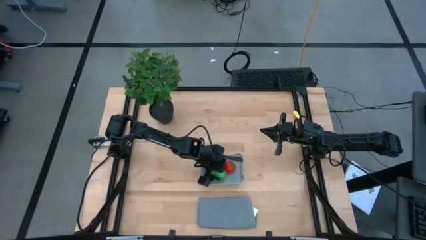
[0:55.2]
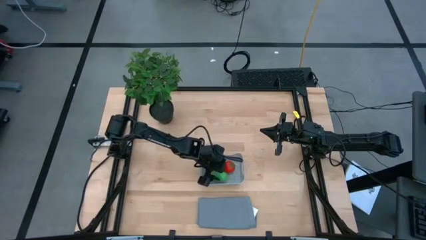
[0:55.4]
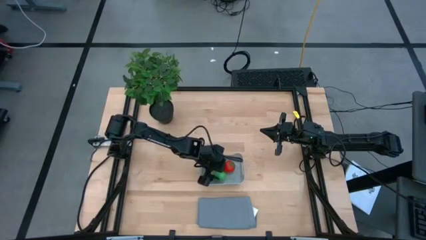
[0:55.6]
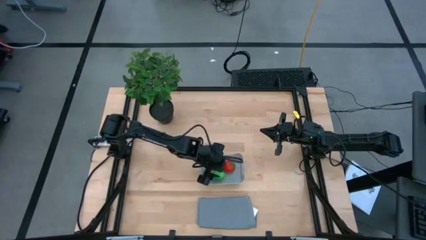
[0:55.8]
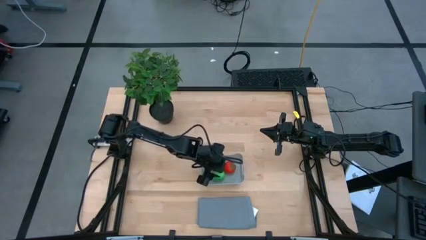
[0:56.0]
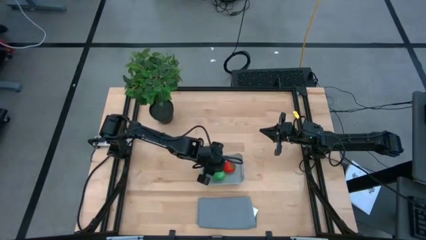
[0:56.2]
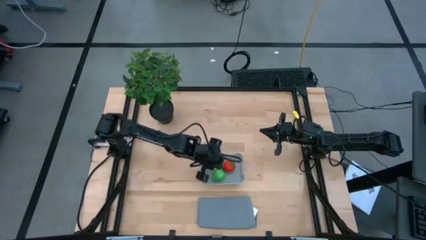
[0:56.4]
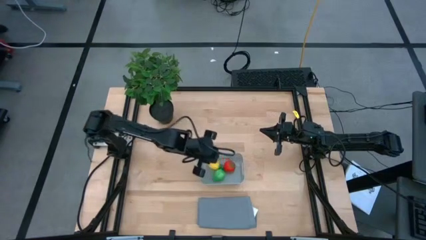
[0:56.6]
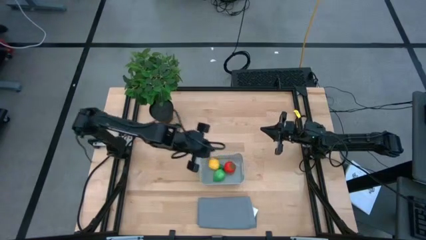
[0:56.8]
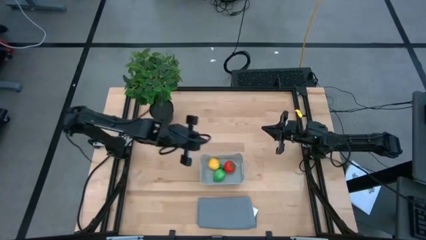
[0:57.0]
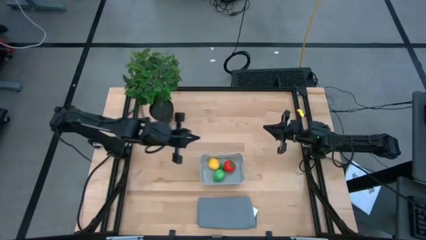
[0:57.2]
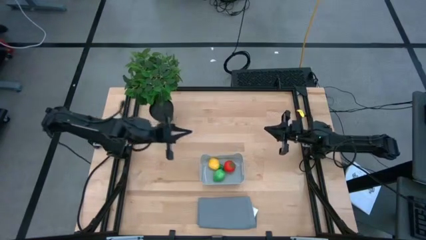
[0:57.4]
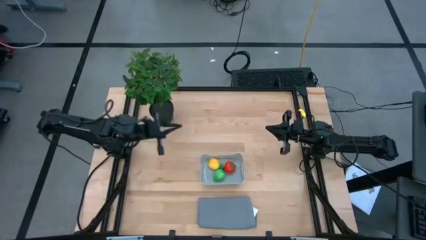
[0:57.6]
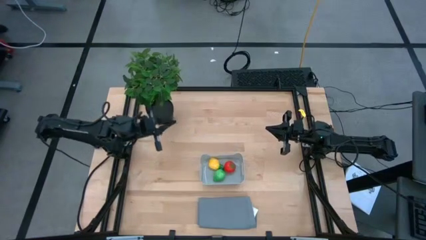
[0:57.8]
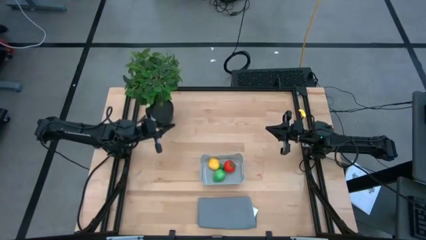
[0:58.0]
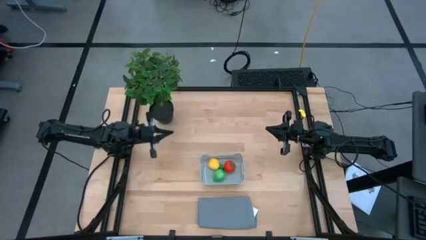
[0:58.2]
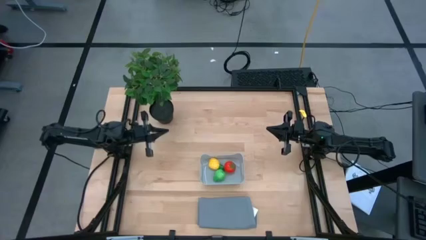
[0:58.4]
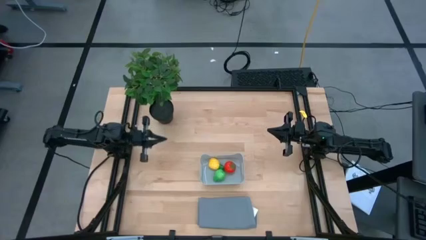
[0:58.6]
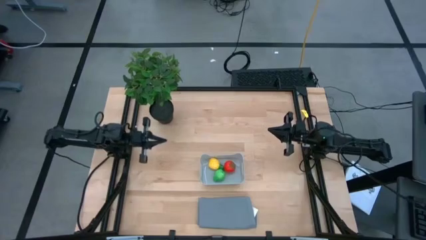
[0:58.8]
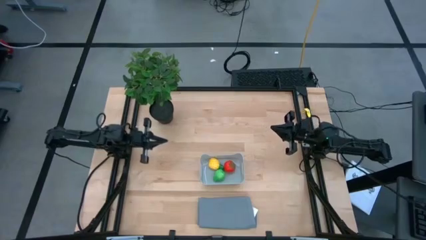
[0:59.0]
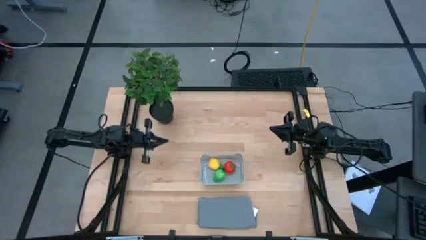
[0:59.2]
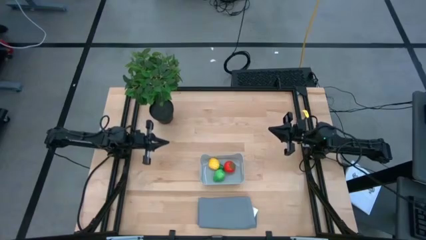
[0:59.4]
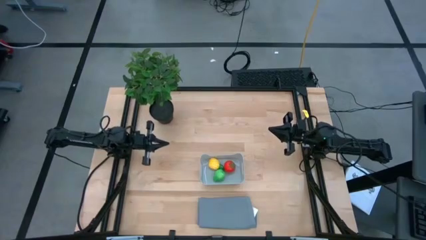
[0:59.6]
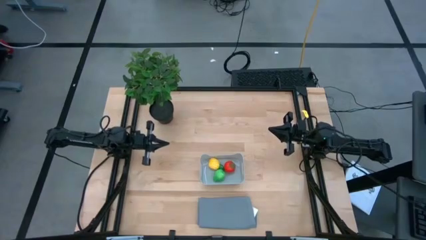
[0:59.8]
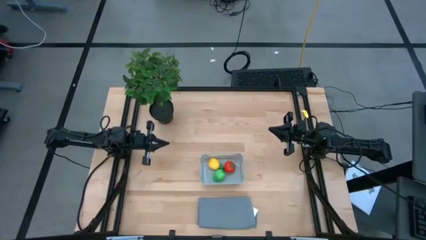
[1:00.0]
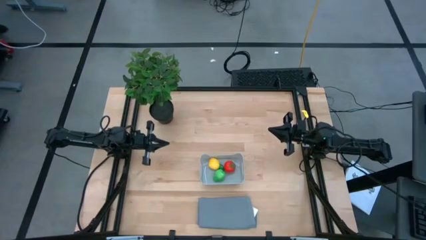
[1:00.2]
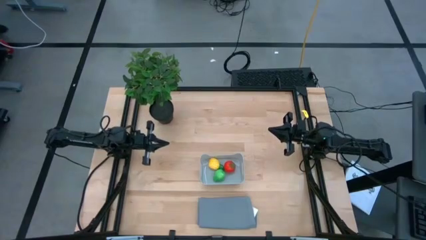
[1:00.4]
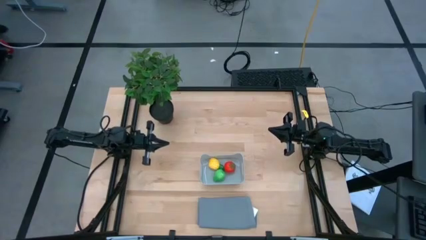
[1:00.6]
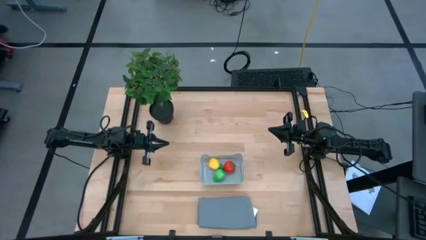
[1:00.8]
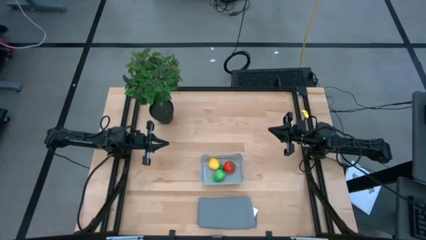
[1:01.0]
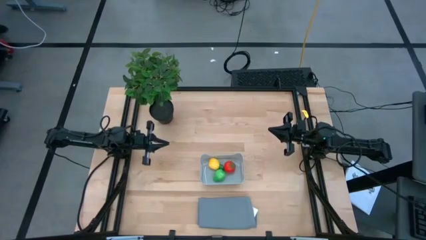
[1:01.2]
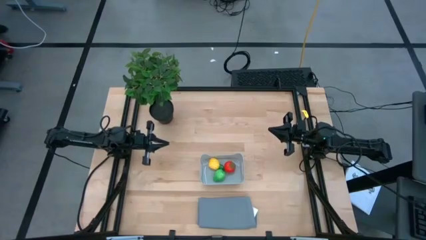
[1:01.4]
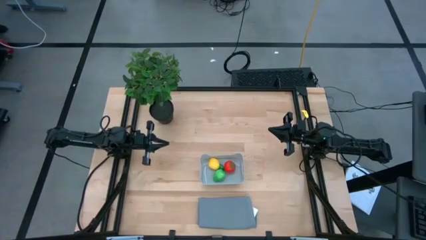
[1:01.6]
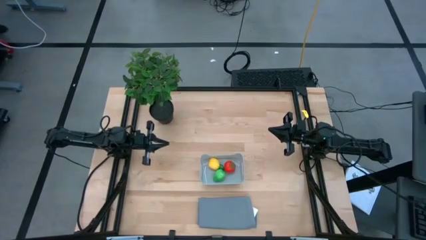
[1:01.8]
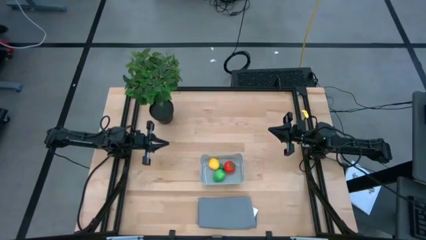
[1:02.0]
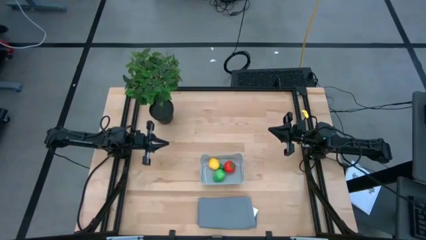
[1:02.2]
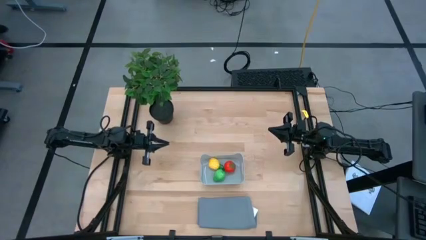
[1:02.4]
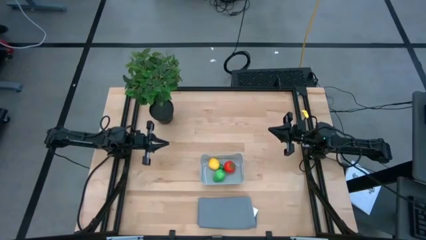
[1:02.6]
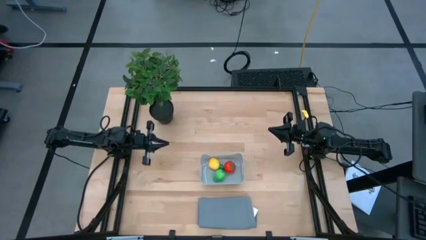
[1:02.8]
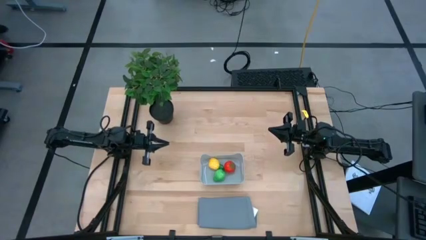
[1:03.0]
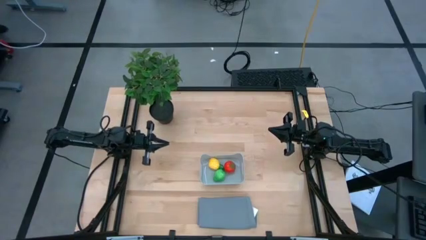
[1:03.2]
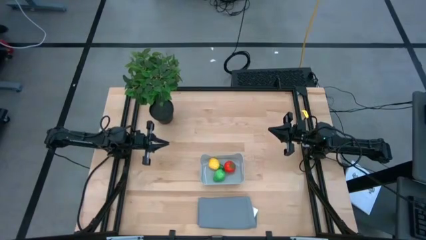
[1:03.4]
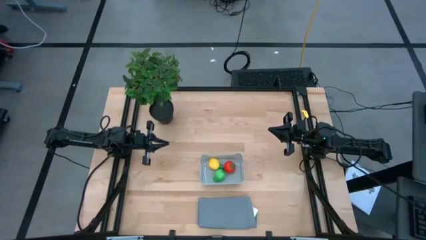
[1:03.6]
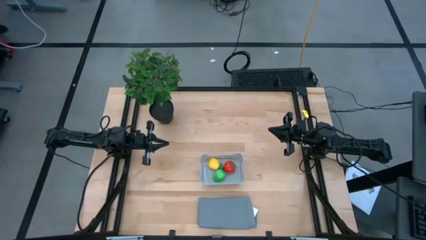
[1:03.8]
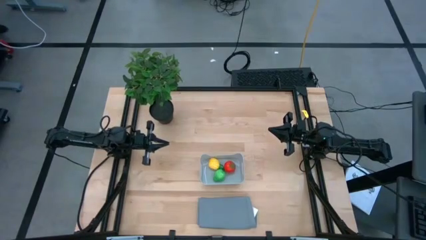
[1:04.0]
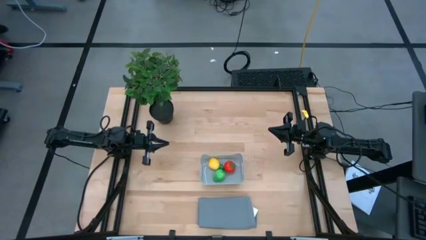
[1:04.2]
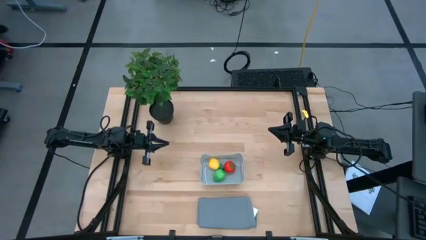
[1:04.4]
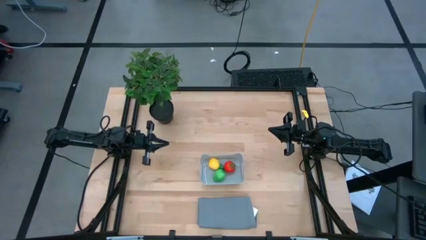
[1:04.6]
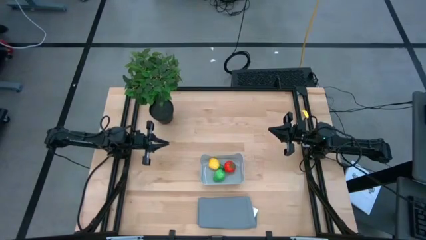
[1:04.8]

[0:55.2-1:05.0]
Task: Pick and placing Produce into tupperware
Return to Home Position
